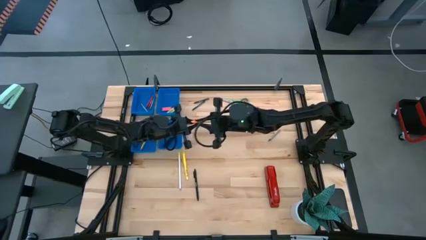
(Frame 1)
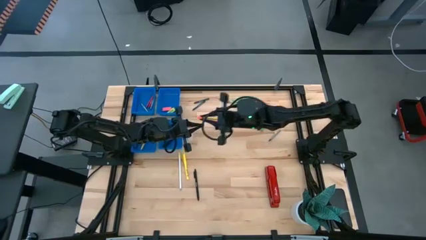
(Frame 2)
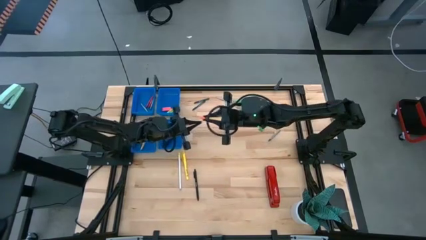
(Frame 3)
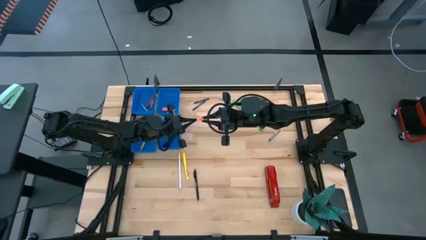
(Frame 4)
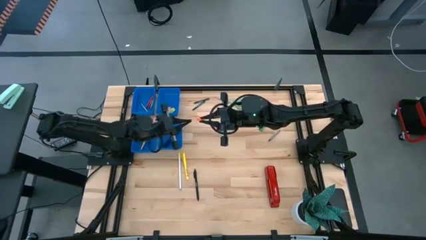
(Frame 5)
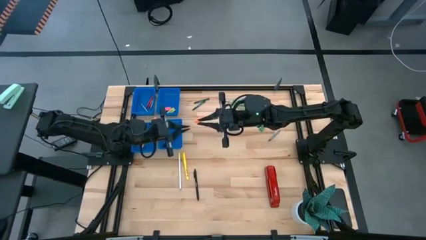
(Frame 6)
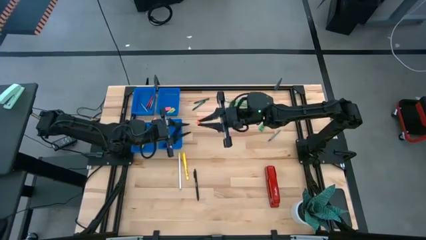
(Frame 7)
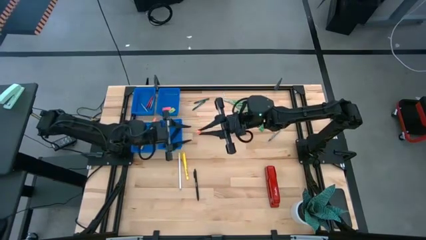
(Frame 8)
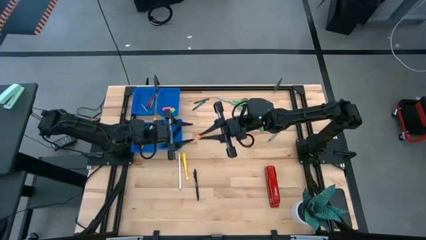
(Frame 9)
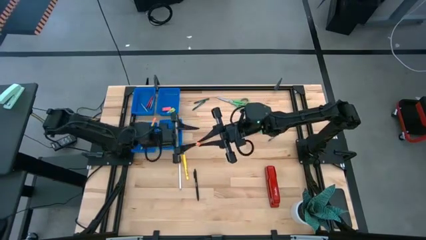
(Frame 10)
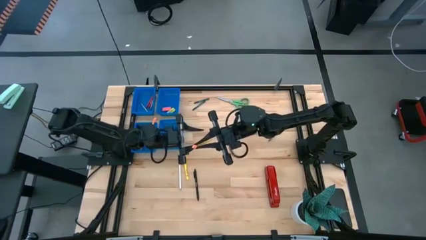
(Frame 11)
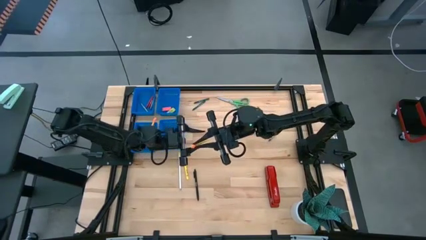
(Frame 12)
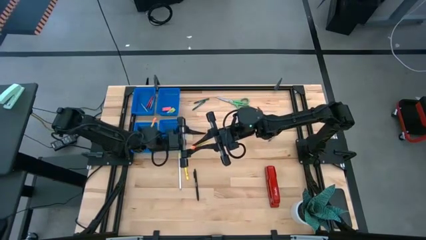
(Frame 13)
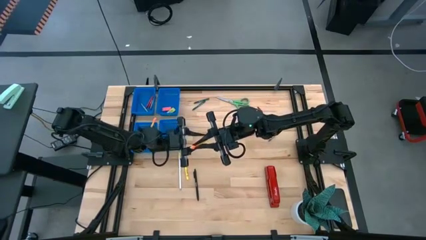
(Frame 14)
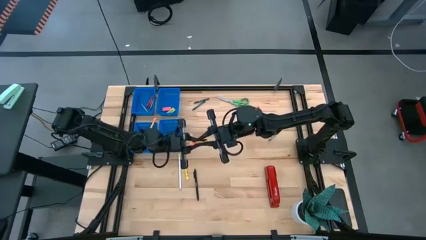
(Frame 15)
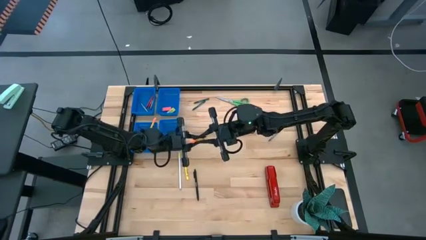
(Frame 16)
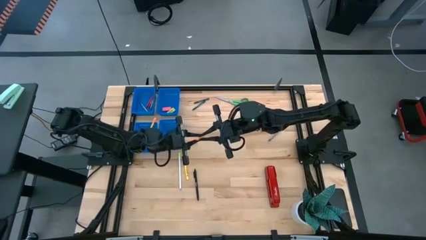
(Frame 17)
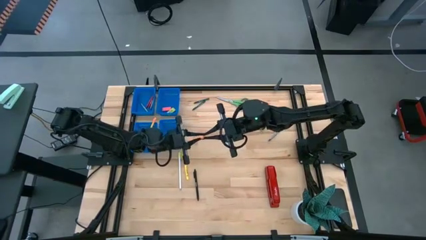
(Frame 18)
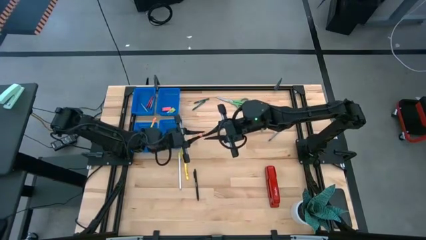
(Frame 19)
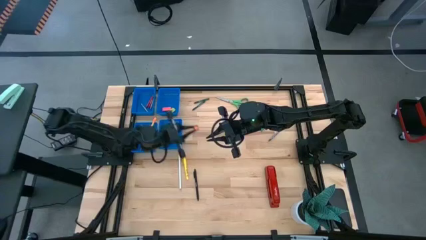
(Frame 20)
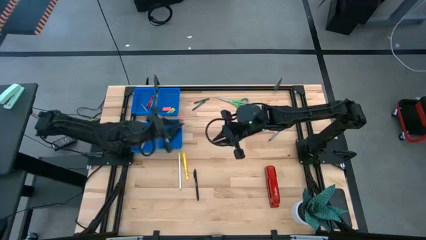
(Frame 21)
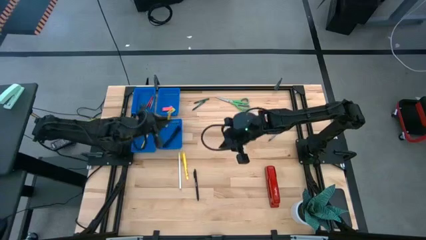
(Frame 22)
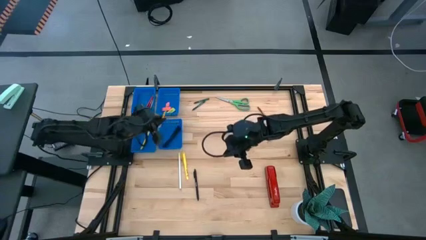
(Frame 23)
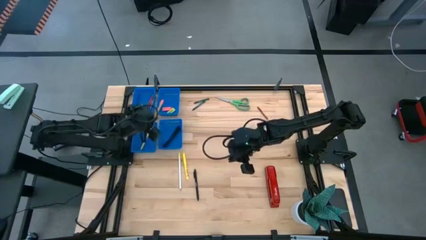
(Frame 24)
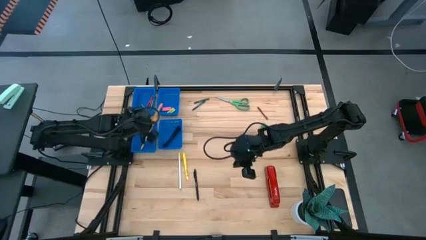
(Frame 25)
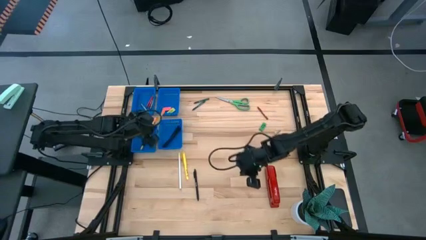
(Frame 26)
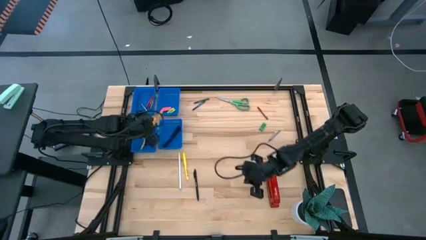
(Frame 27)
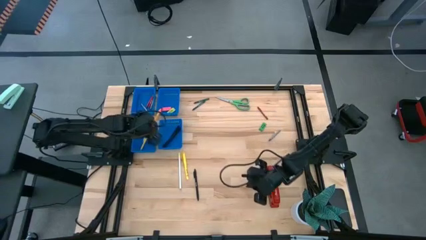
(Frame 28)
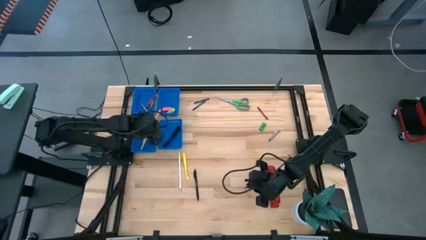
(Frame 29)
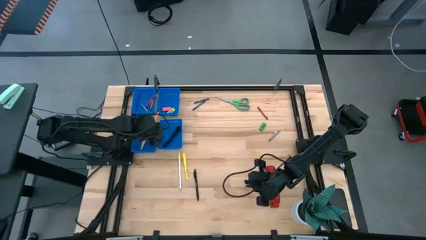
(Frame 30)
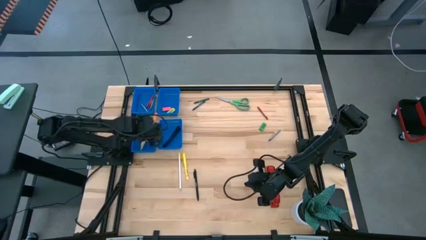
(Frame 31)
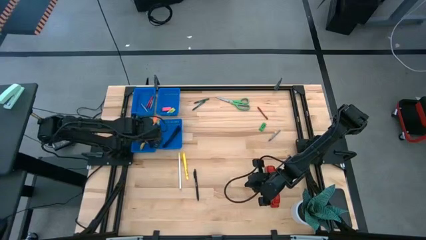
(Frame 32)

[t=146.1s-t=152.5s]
Task: Sort crayons/erasers/pens/pencils in bins
Put the yellow pencil into the bottom left blue bin

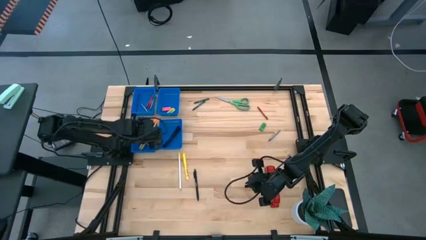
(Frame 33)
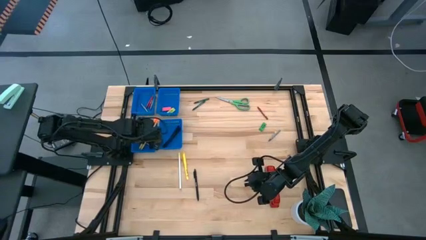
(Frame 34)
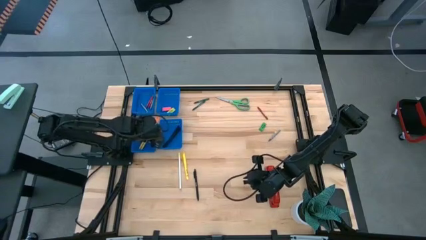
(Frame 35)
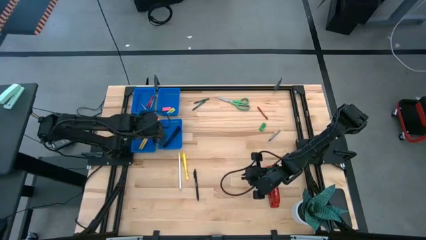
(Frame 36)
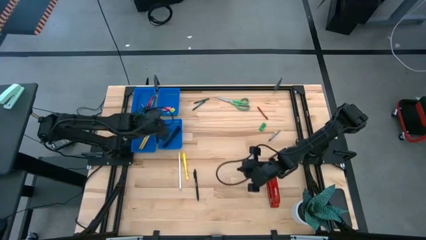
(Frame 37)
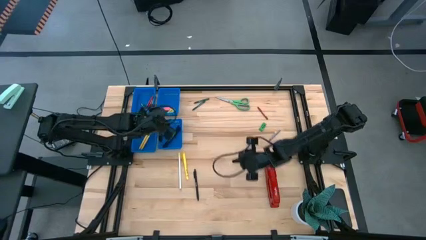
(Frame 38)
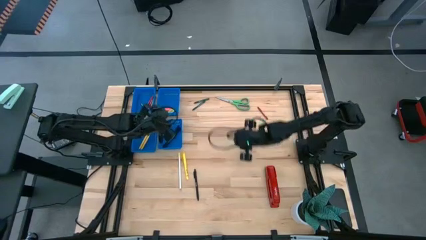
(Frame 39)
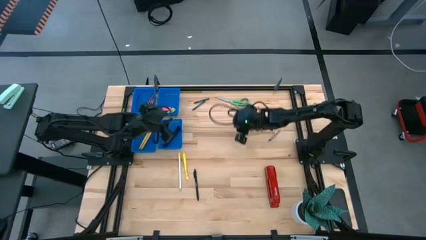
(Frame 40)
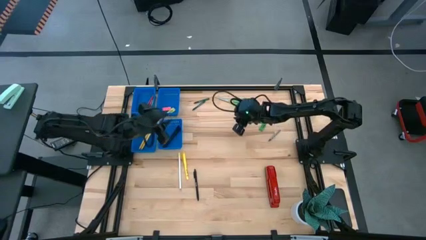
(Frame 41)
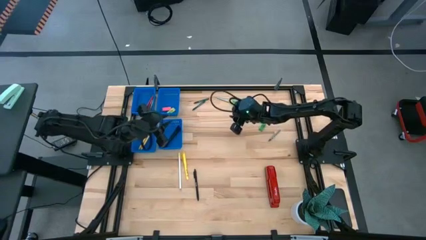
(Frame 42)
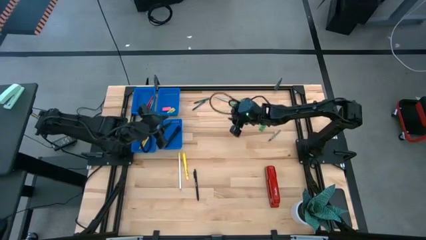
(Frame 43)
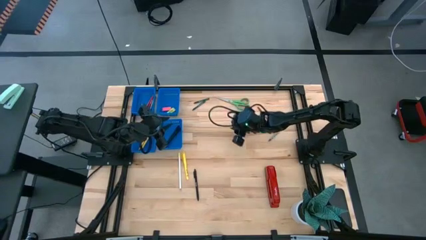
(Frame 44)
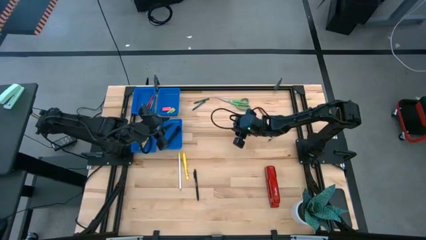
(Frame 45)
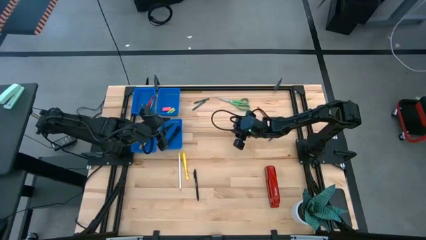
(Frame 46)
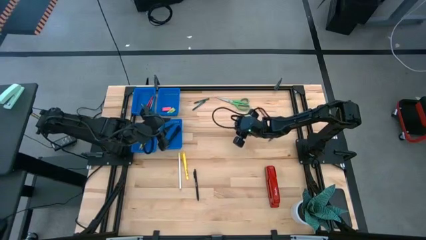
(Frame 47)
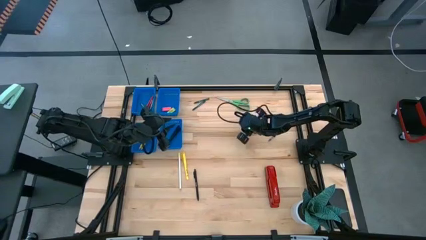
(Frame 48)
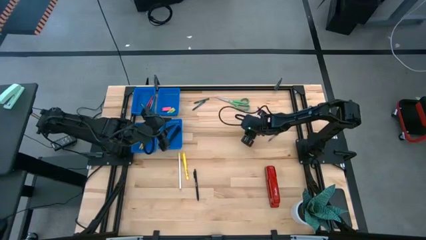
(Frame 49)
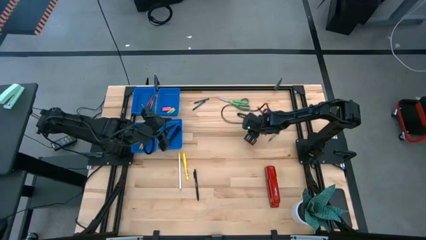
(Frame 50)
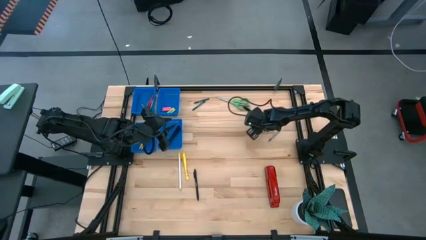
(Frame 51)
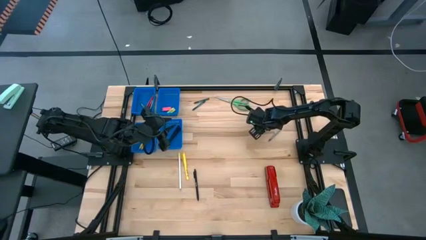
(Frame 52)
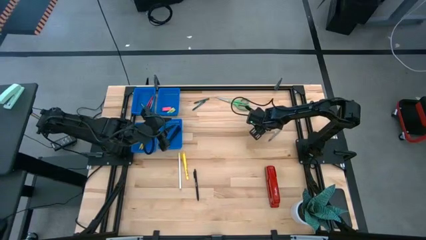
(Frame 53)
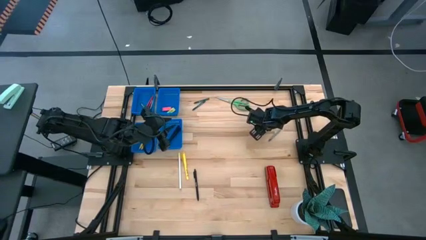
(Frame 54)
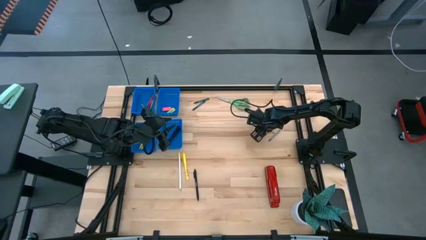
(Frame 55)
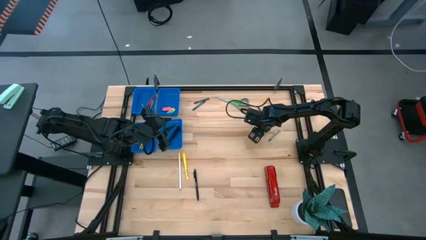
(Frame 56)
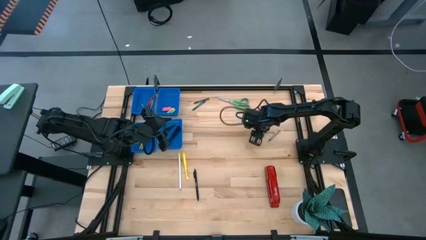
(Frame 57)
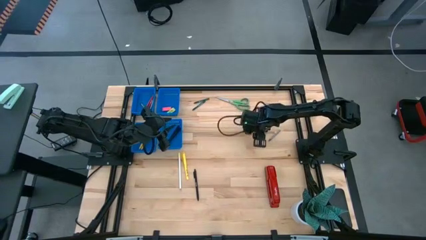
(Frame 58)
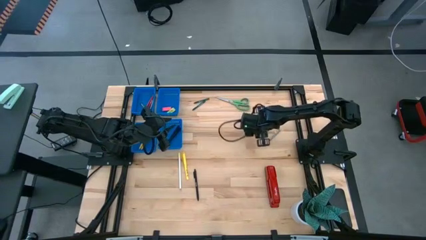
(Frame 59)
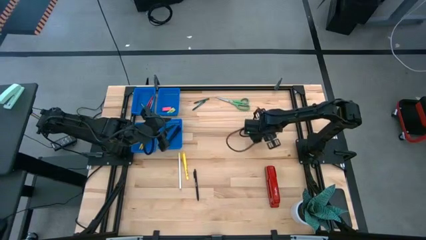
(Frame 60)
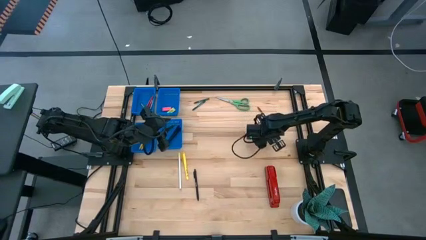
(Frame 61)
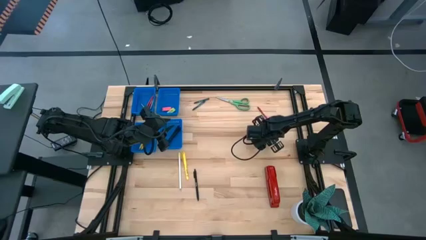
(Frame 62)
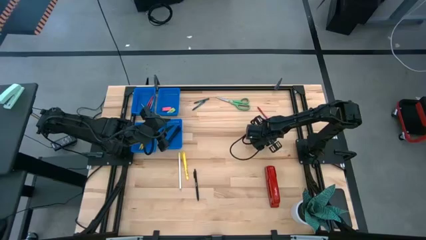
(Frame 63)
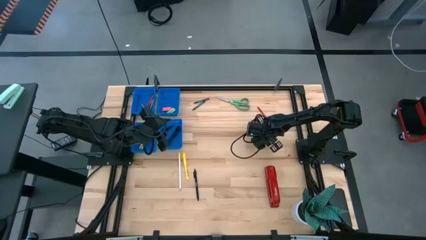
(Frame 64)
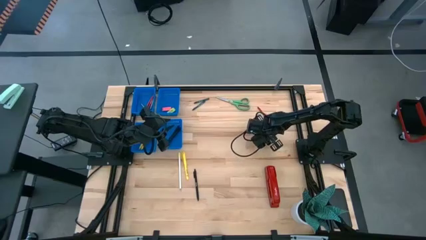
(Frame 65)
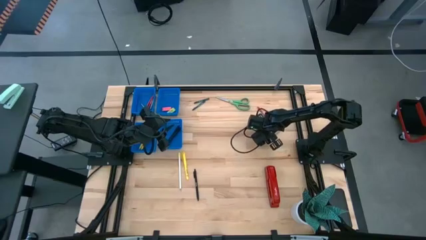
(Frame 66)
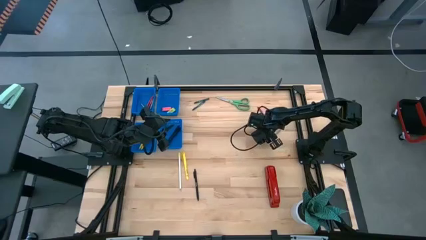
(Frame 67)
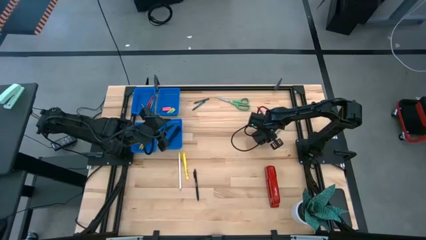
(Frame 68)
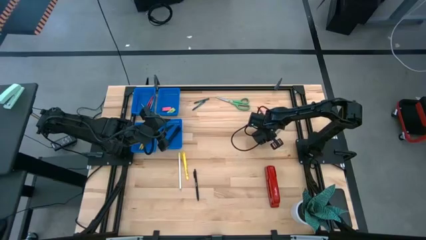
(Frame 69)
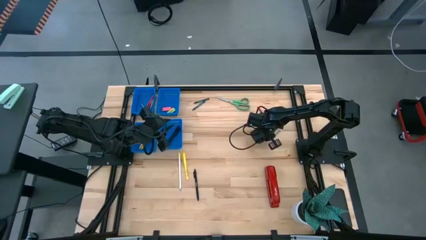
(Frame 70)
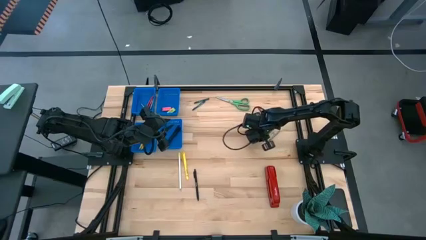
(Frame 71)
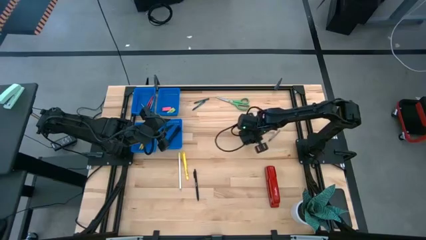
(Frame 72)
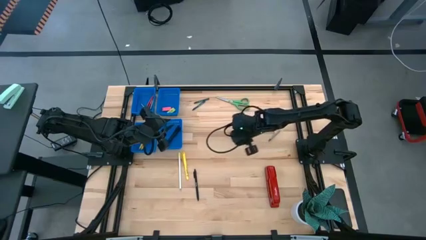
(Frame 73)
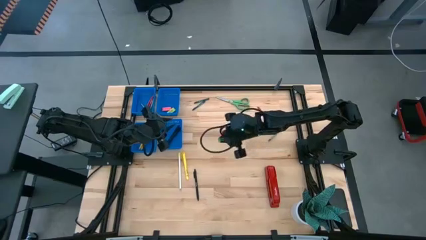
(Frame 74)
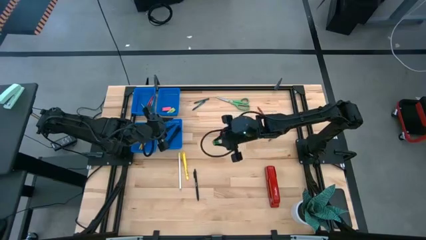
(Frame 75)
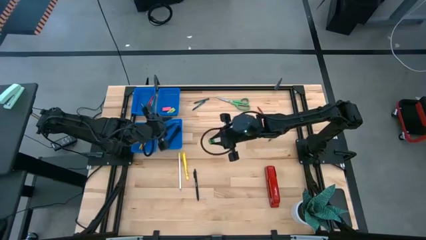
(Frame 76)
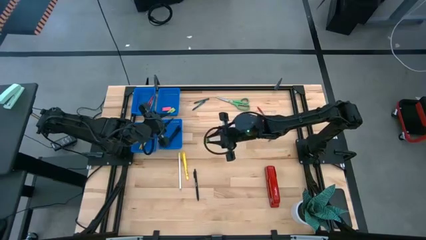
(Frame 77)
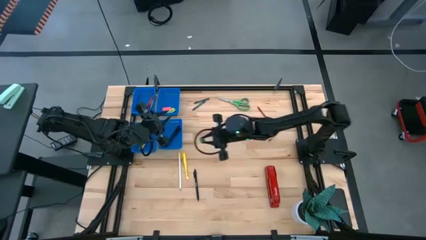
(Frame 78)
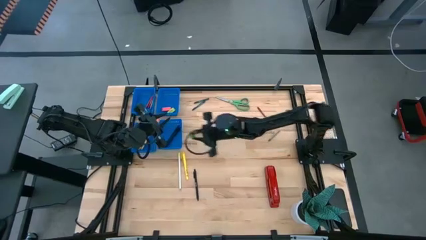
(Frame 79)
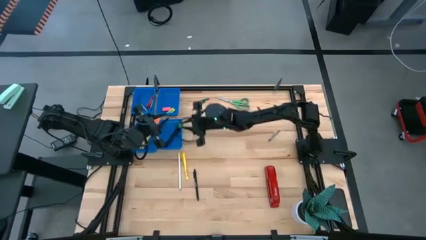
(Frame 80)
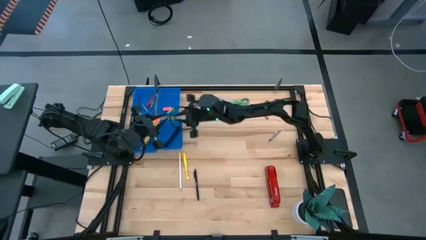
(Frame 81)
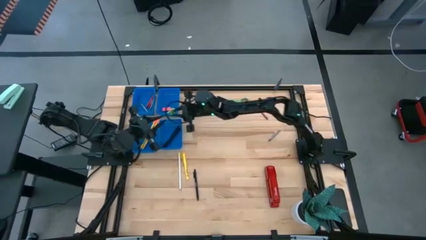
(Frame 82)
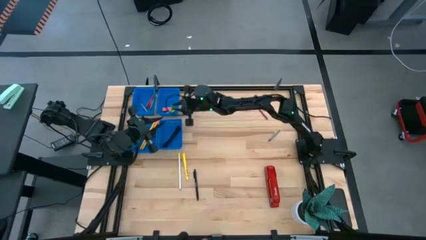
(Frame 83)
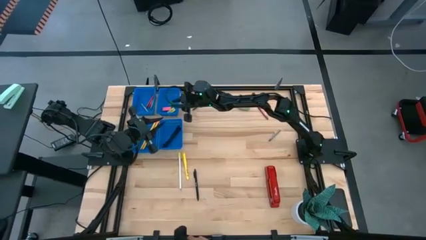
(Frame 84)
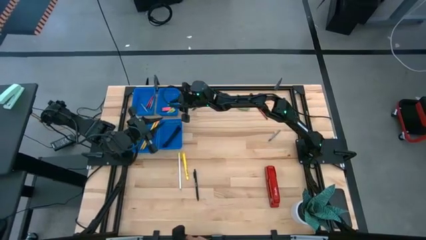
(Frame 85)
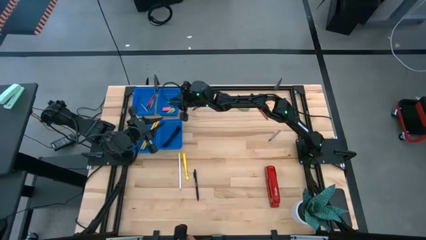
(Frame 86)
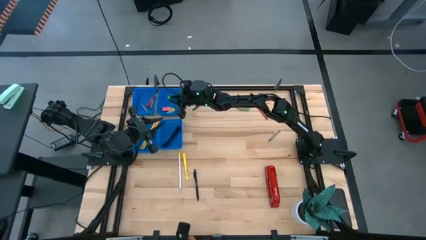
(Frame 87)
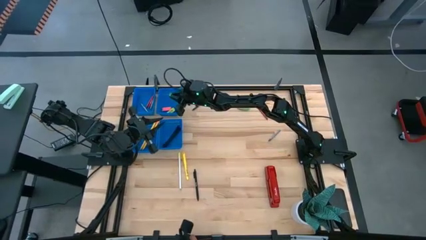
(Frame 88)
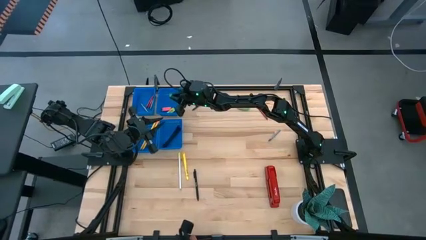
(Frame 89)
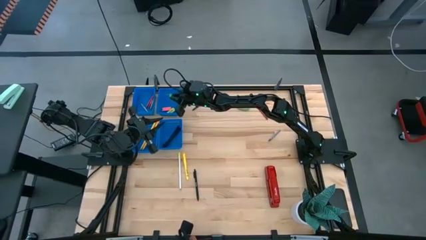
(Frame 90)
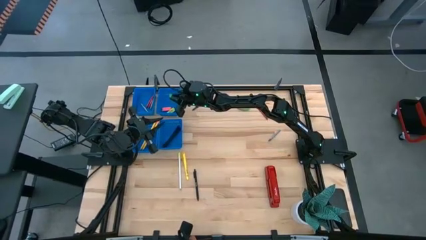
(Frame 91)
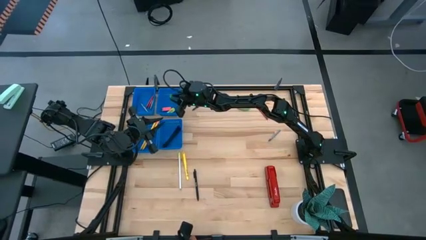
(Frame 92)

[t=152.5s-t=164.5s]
Put the green eraser into the top left blue bin
